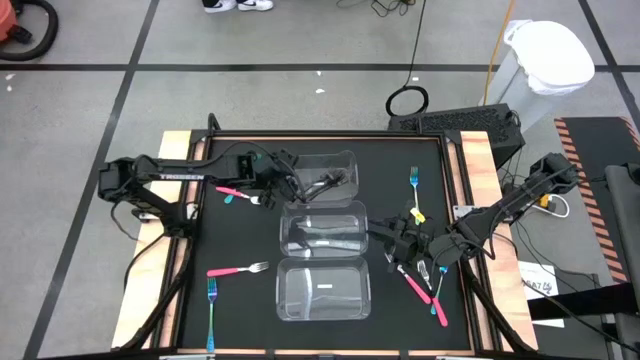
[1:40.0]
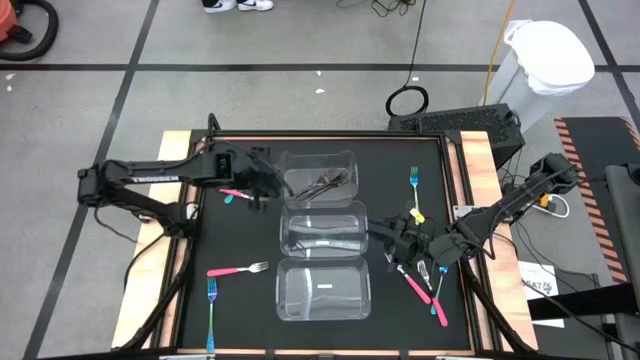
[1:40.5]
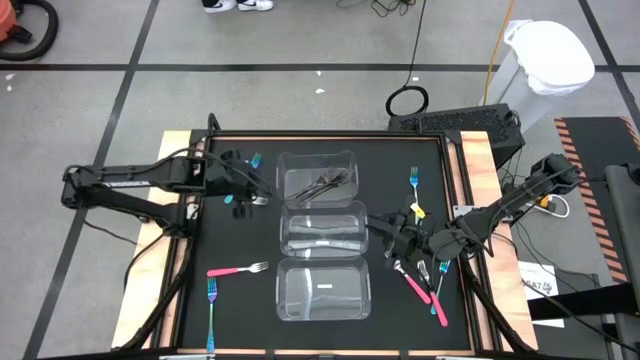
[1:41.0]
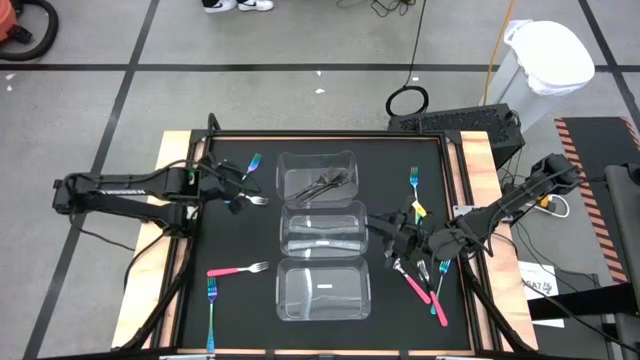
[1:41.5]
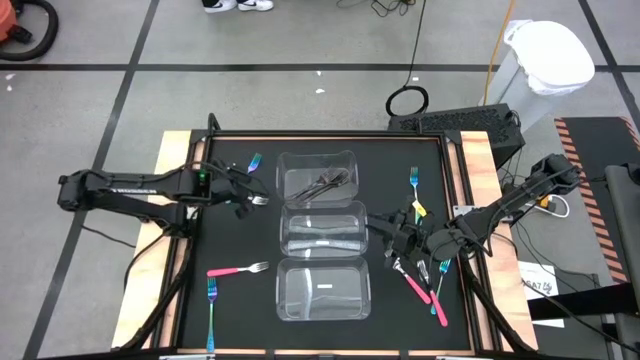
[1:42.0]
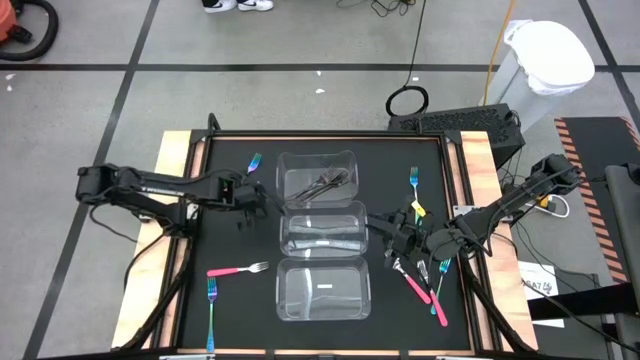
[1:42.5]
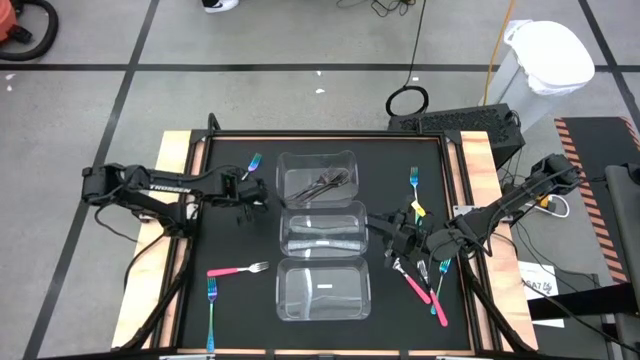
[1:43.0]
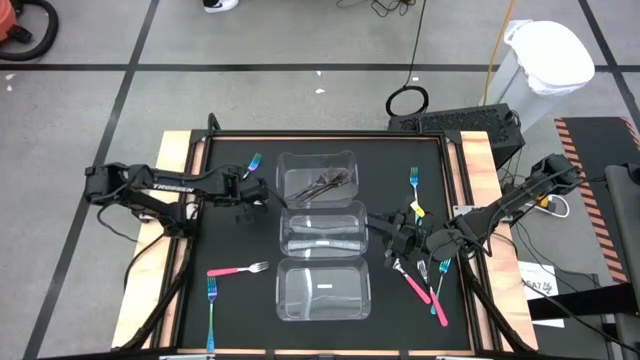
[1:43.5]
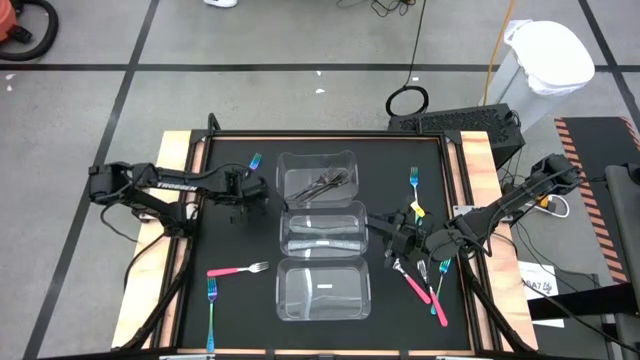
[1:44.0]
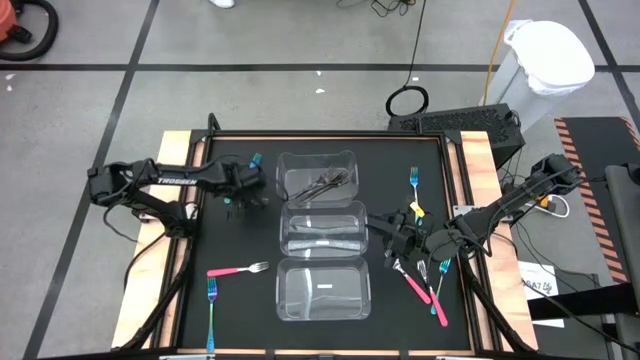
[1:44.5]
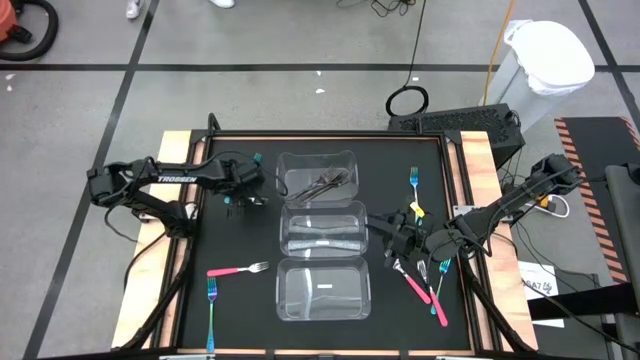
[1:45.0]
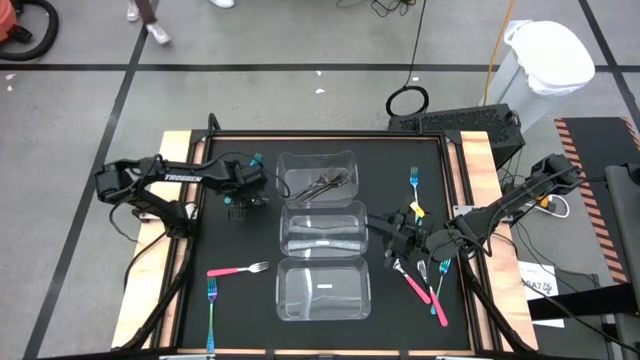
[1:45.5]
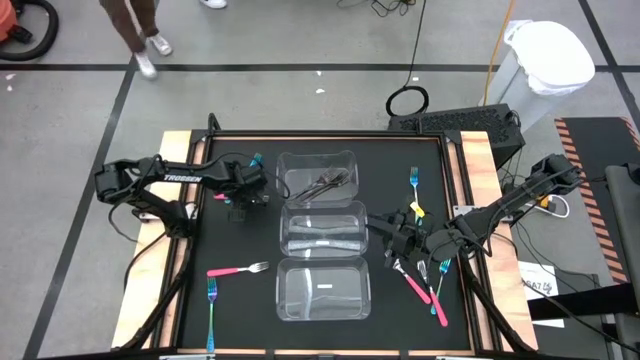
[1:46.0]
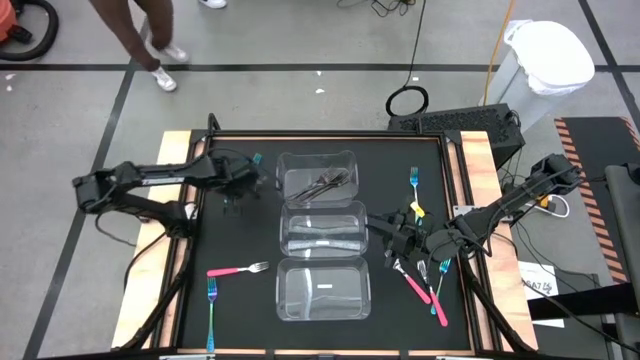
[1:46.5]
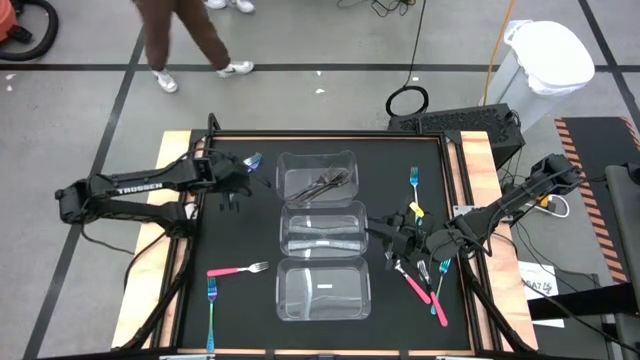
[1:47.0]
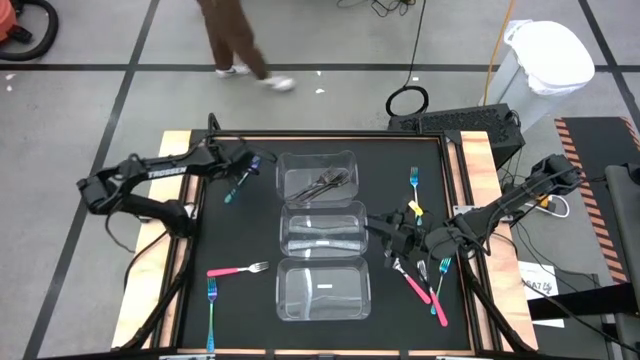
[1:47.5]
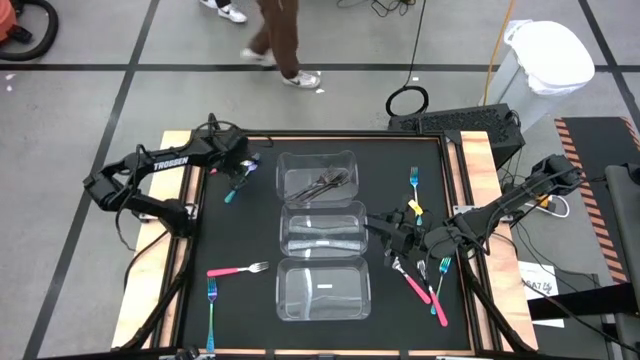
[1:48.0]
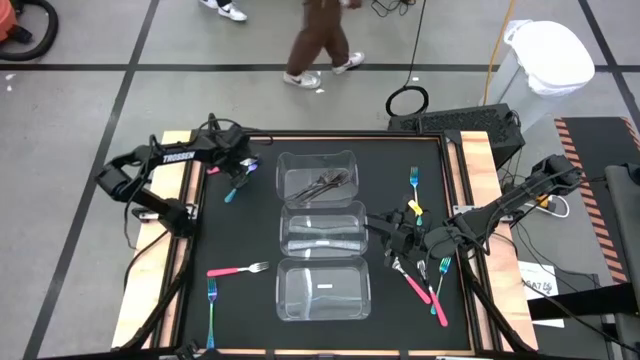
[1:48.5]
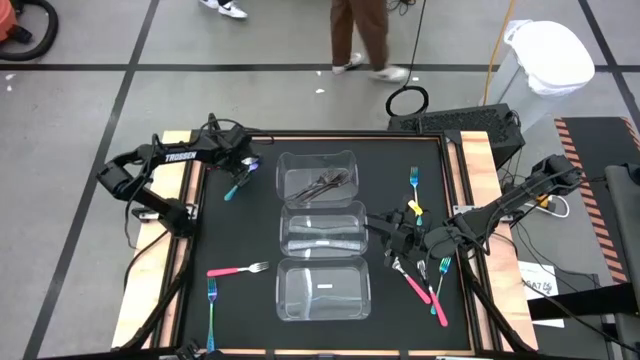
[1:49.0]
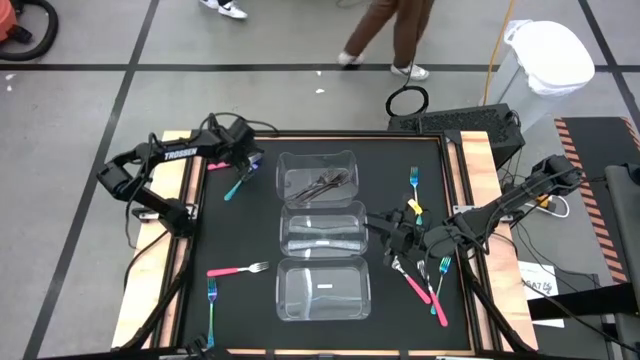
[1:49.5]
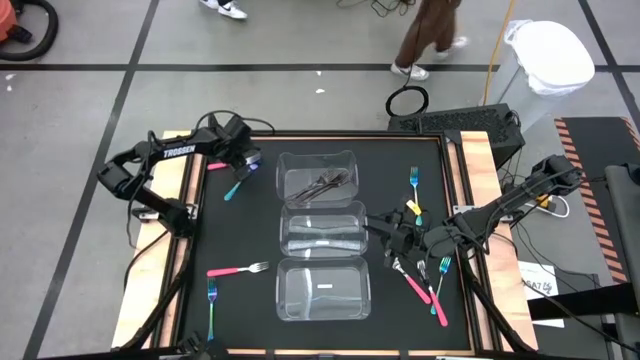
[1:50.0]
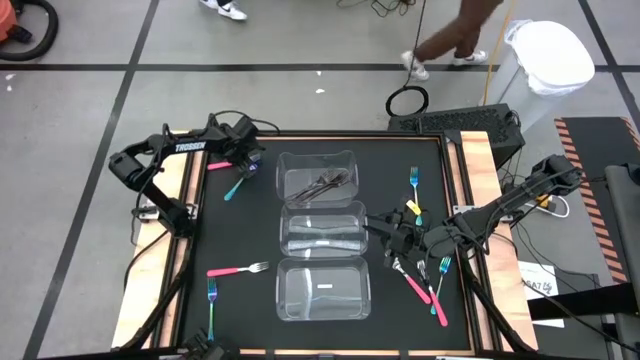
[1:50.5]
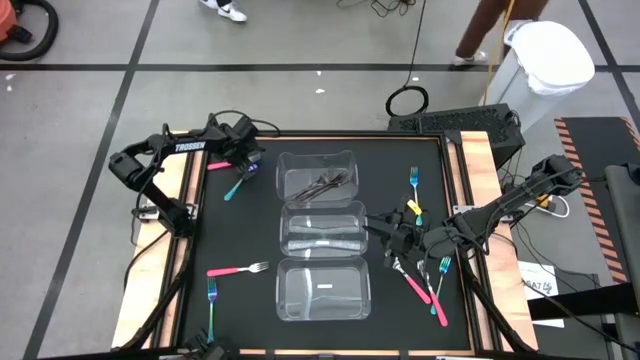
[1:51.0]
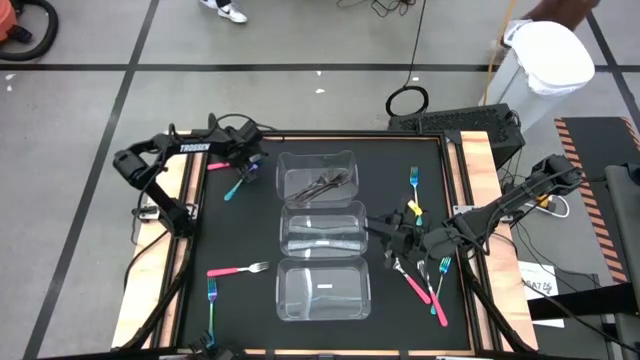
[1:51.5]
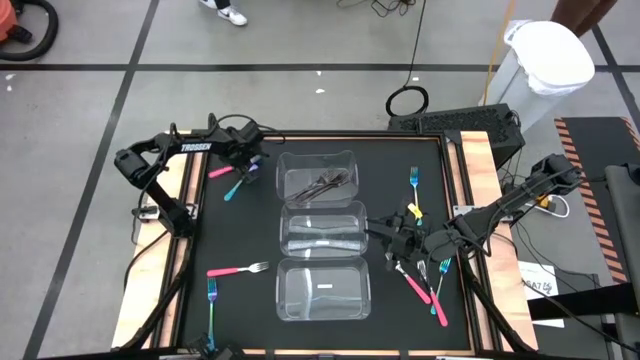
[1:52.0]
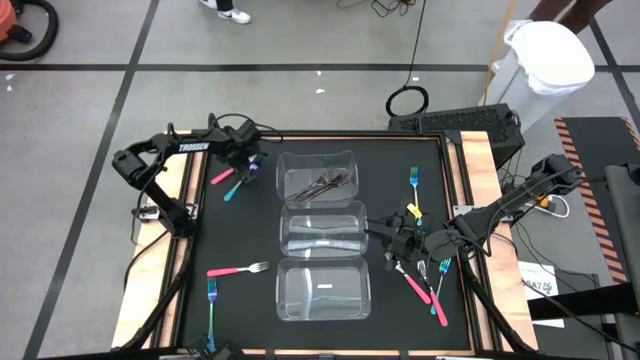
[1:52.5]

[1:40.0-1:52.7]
Task: Sort silverware by color (type)
Put the top left pink fork into the middle transparent bin

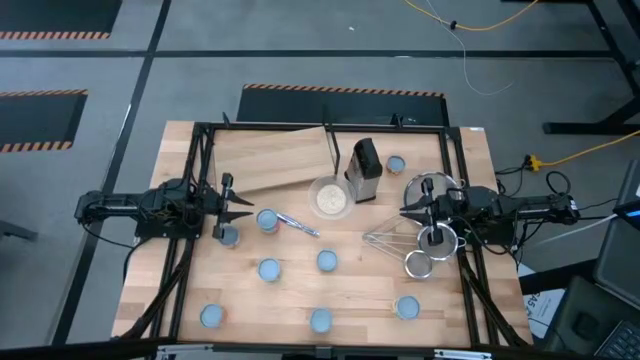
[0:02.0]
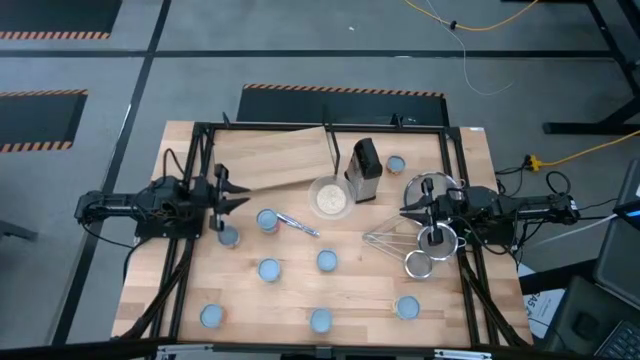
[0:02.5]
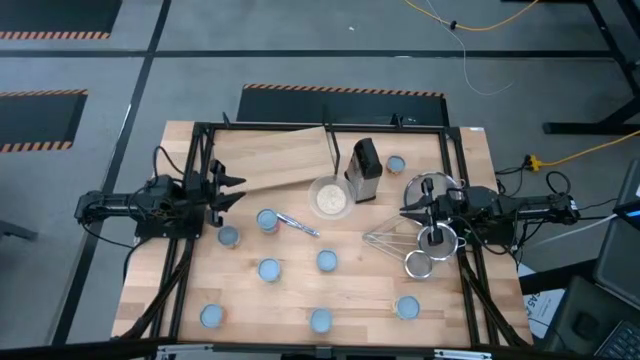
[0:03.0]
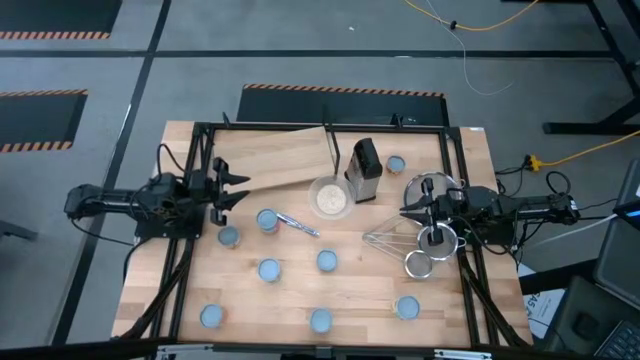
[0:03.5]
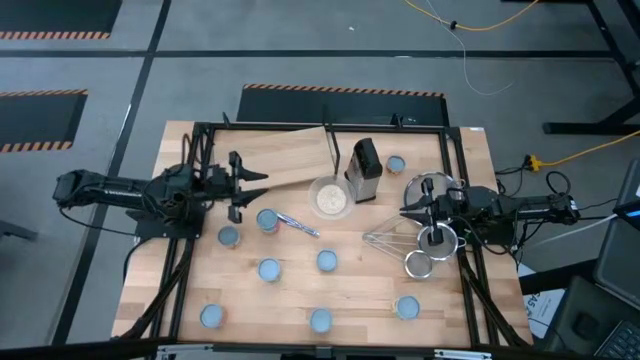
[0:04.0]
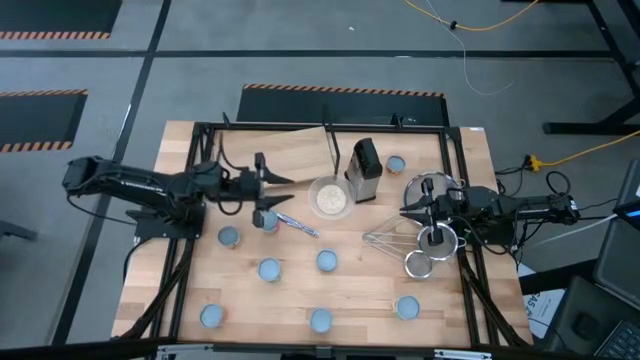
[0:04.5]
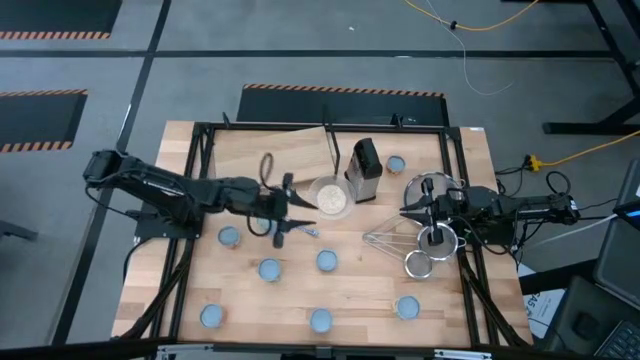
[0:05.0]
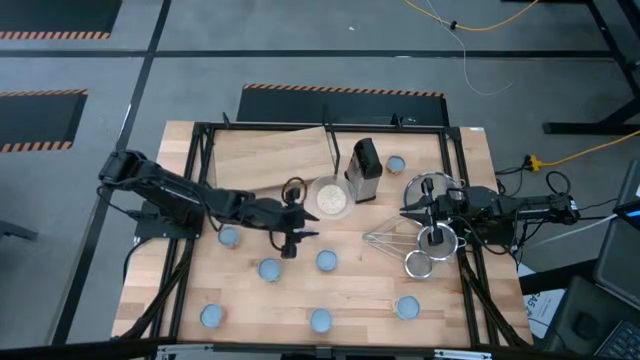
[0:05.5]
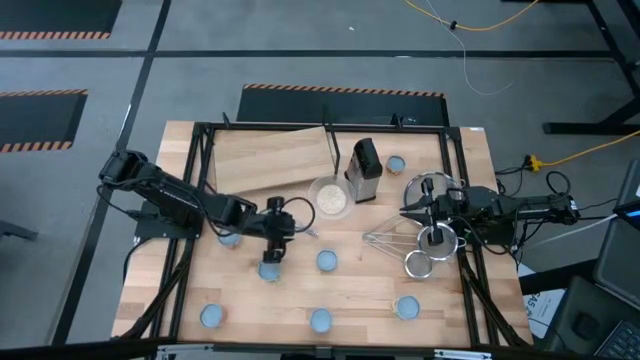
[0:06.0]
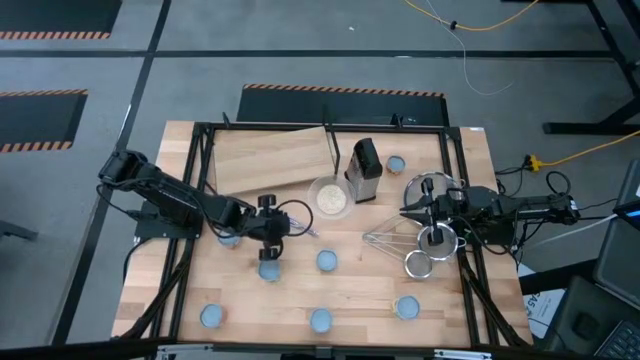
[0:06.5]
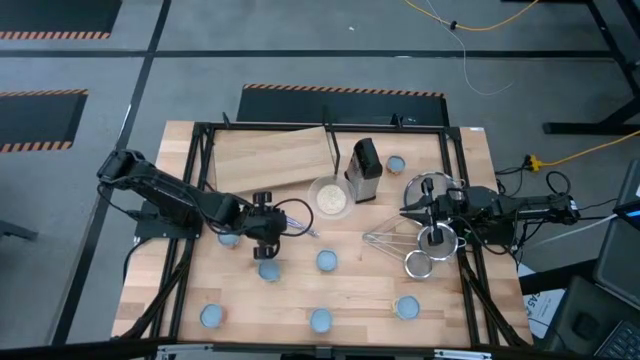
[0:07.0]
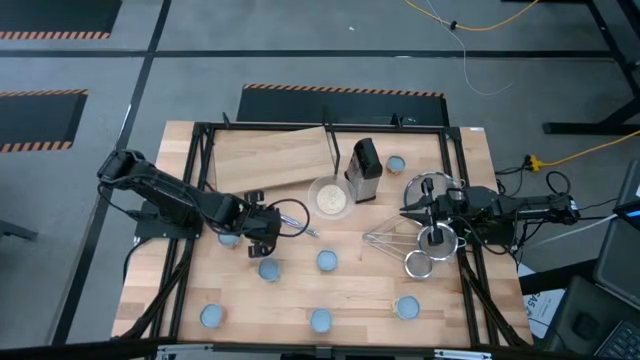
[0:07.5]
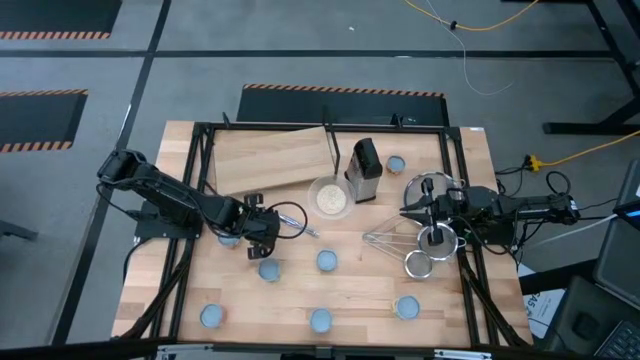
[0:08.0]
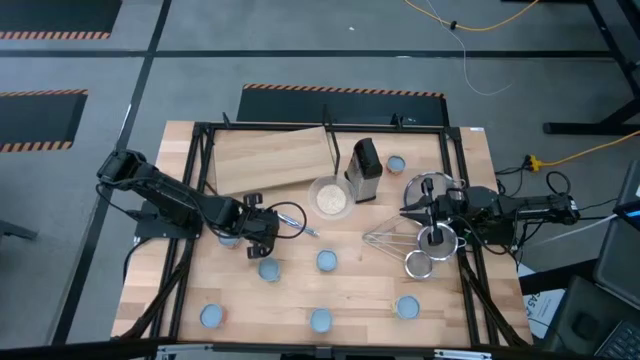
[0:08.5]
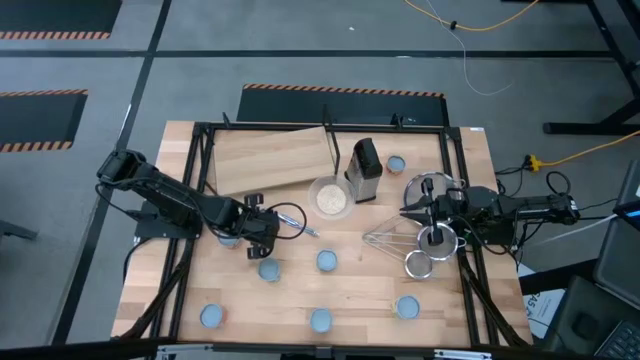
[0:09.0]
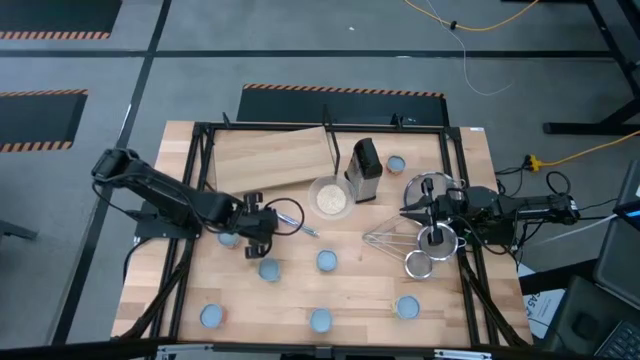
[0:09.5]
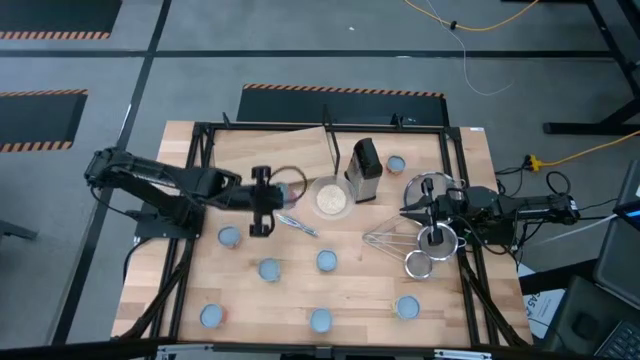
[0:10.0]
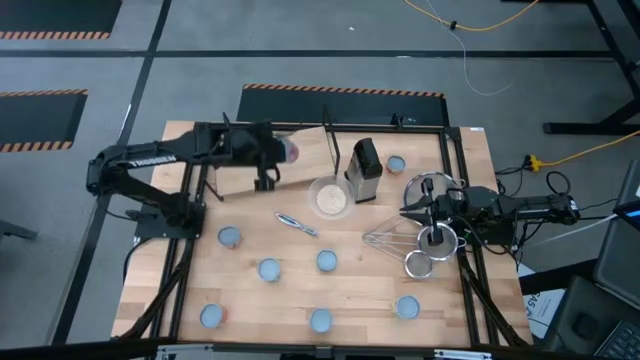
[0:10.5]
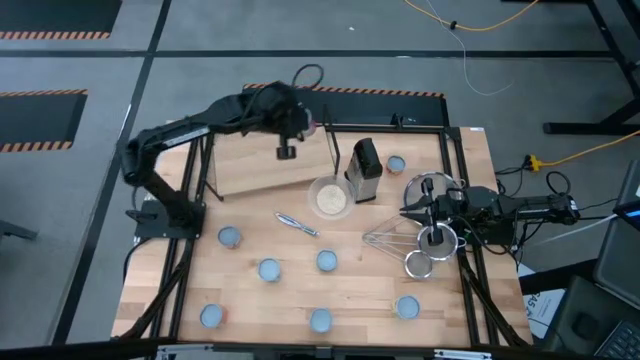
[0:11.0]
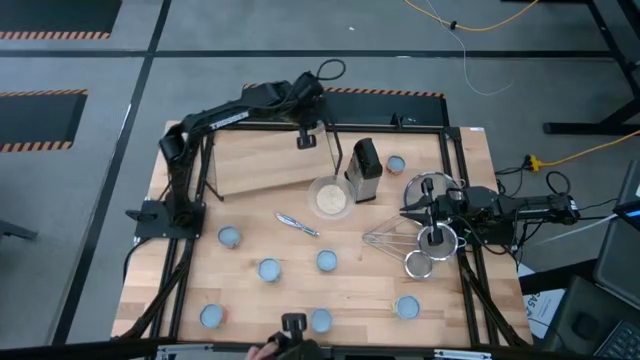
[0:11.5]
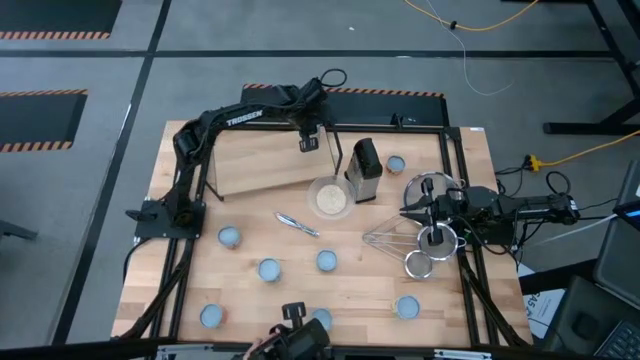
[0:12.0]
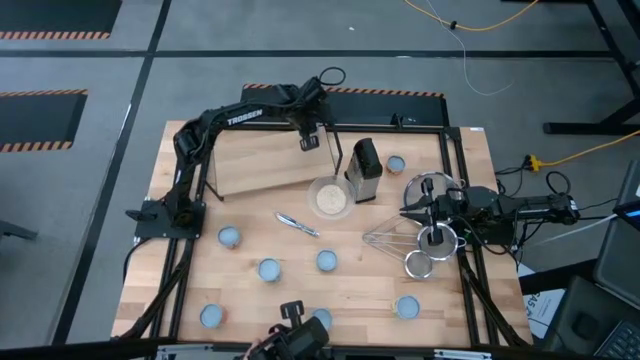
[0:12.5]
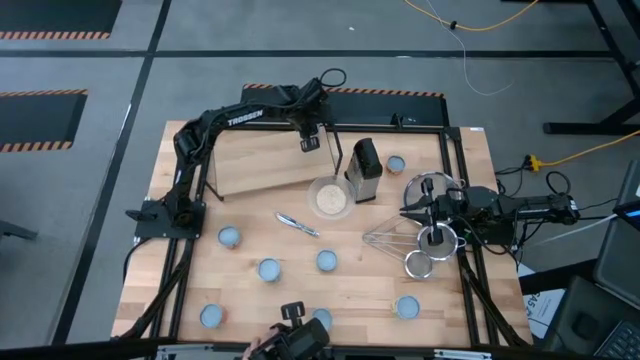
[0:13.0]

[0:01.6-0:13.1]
Task: Pick and place cans onto a shelf
Put the green can on the shelf
